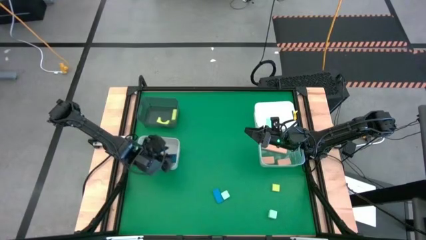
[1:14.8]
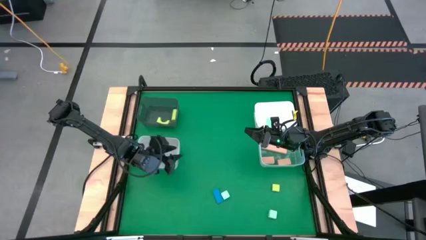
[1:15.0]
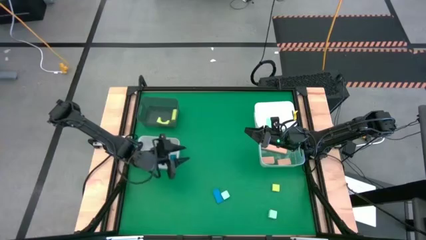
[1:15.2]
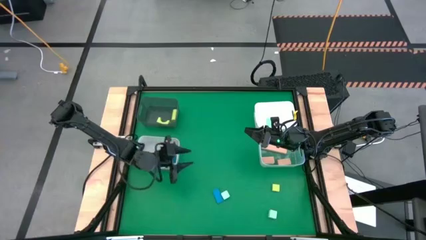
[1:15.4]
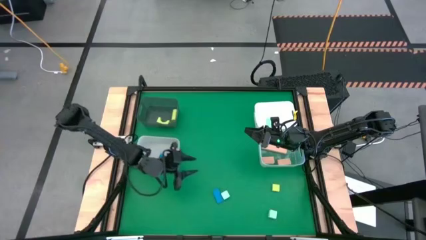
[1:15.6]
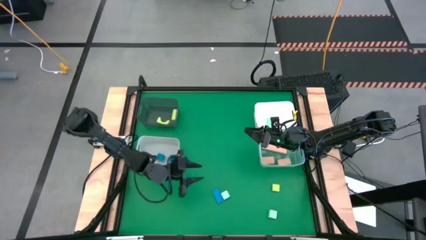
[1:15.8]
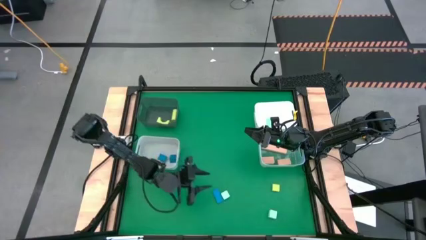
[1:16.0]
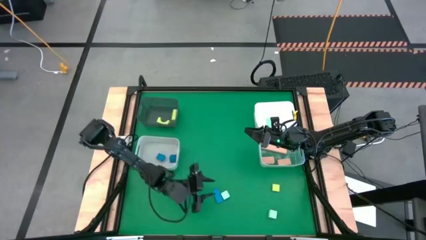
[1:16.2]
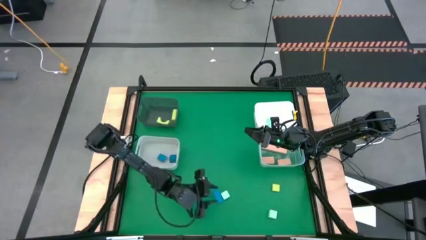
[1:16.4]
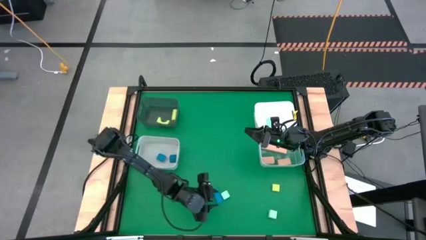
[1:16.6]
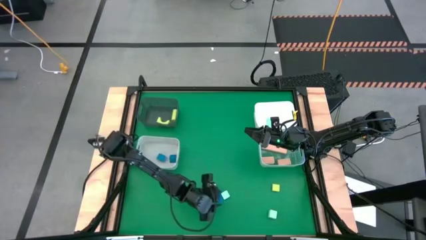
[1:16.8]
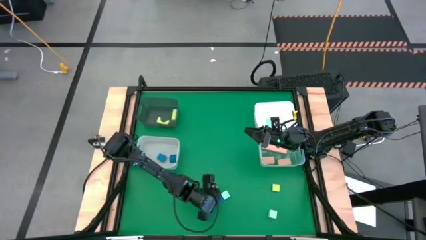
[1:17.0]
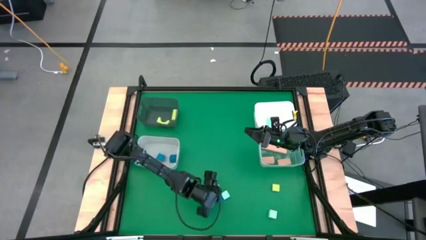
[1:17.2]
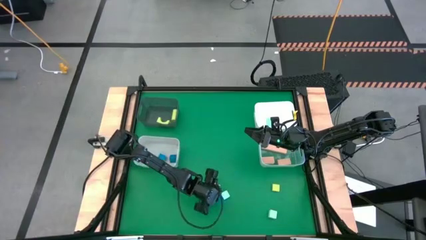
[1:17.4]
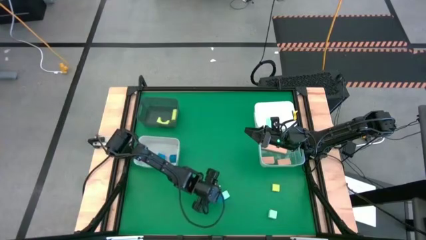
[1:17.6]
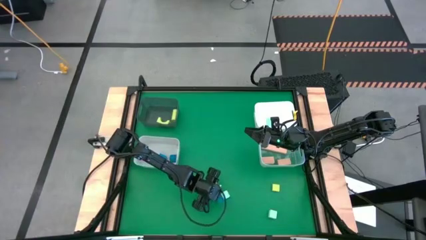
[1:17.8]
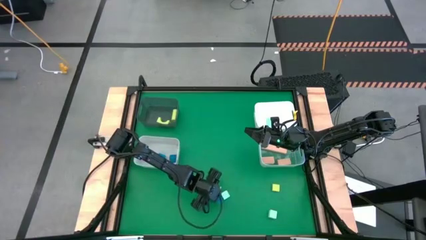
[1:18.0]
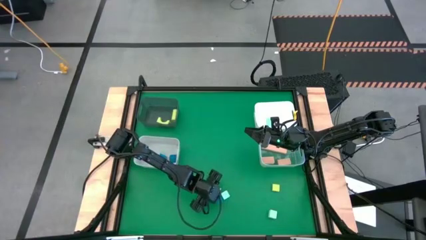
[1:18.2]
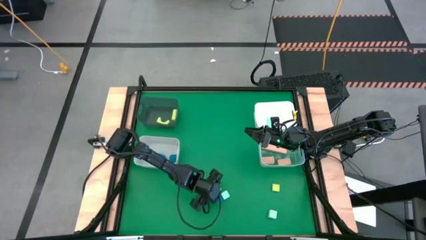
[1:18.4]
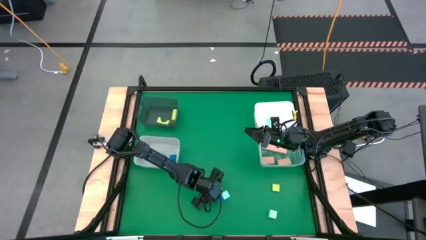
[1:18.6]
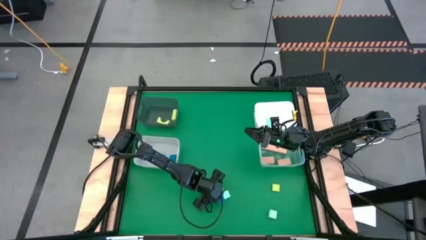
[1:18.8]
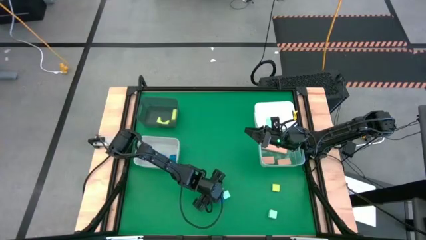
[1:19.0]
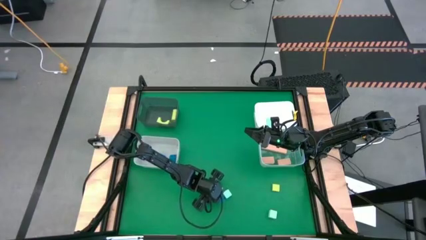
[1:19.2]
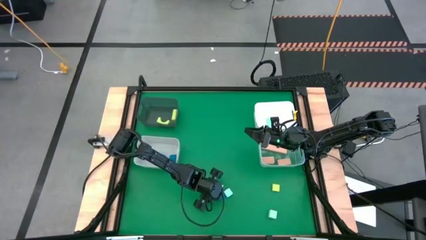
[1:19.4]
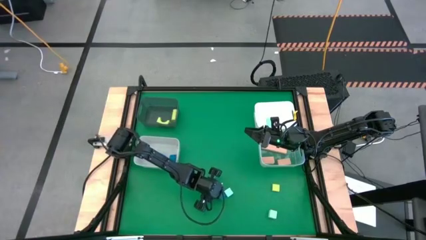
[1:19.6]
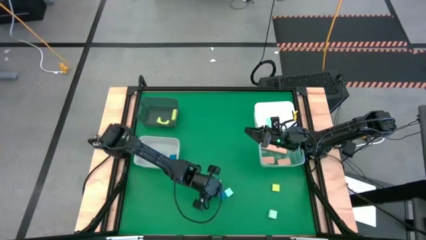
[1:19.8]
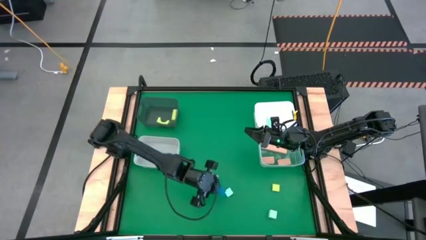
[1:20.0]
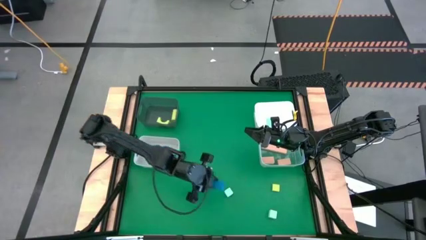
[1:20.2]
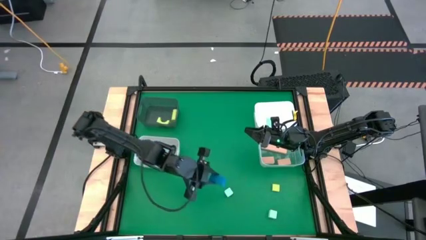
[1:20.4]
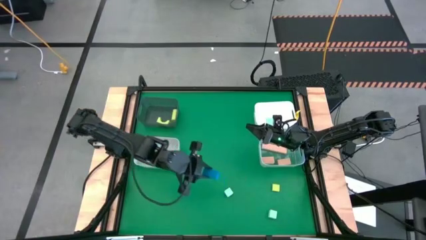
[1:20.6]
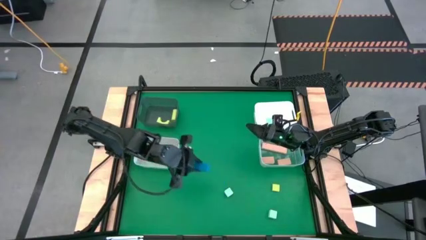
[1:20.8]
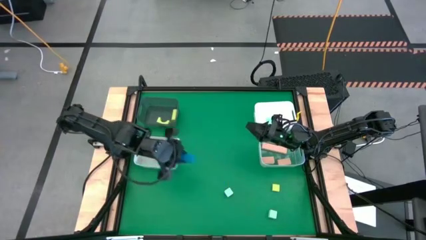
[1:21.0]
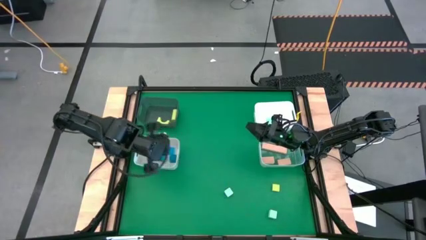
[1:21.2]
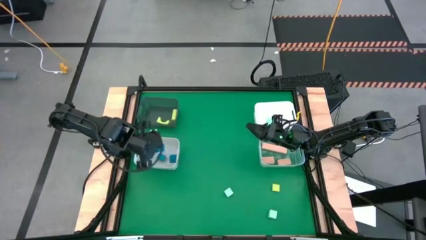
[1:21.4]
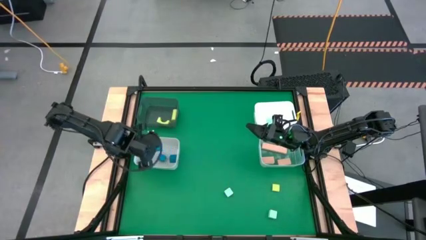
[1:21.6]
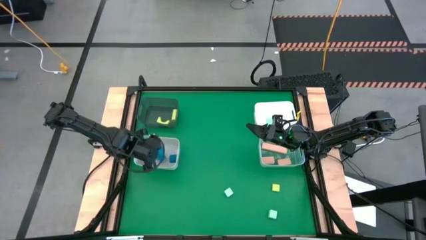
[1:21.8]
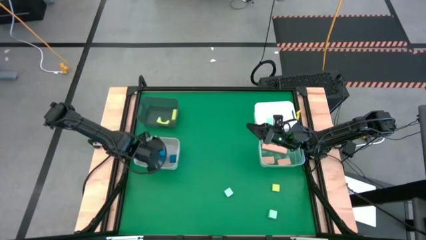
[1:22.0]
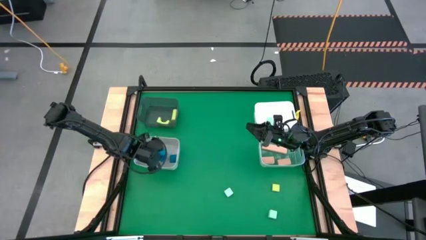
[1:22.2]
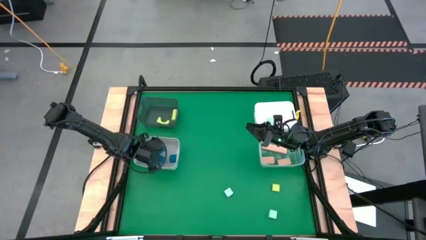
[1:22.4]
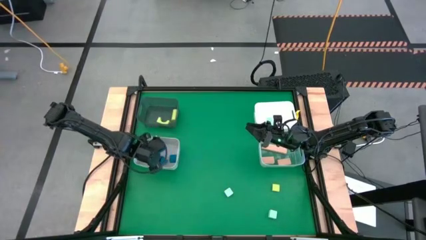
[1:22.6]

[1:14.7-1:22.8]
Task: Sort & place blocks by color
Put the small blue rectangular block into the gray bin

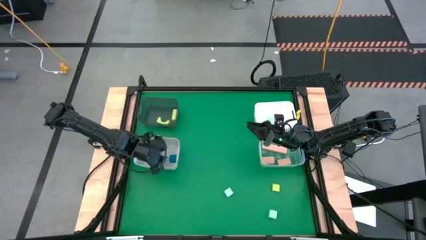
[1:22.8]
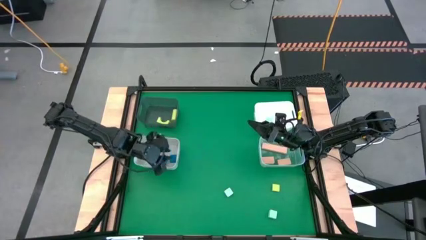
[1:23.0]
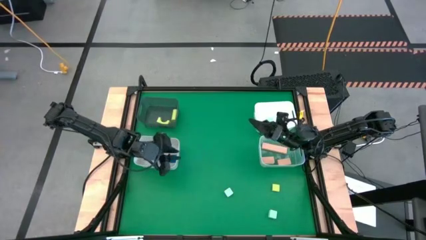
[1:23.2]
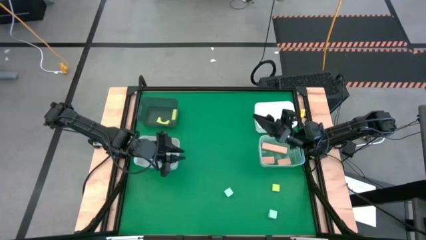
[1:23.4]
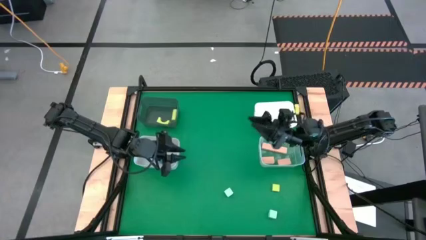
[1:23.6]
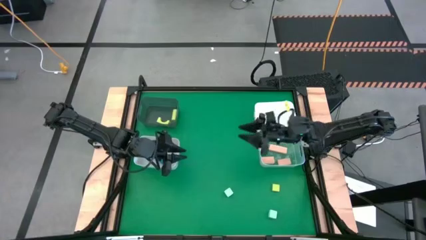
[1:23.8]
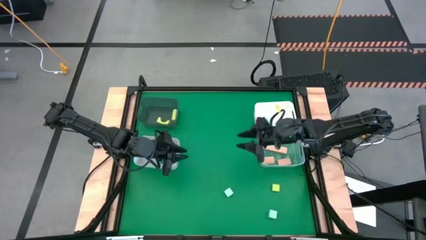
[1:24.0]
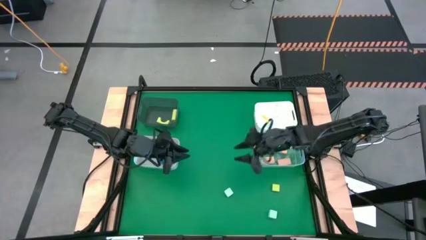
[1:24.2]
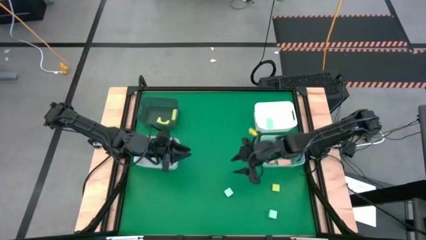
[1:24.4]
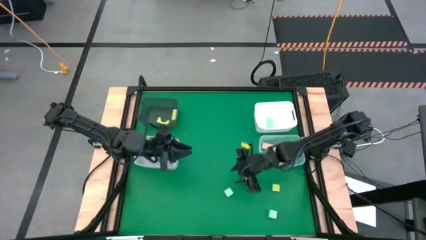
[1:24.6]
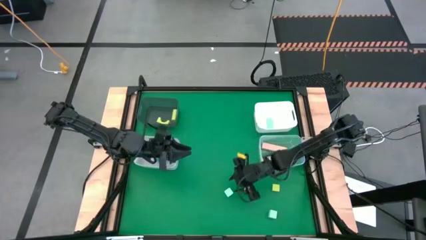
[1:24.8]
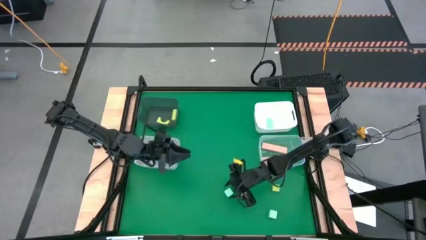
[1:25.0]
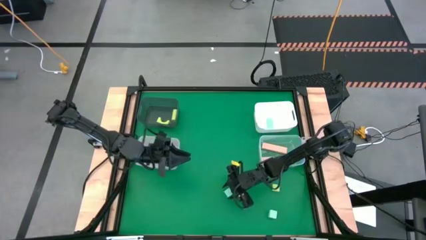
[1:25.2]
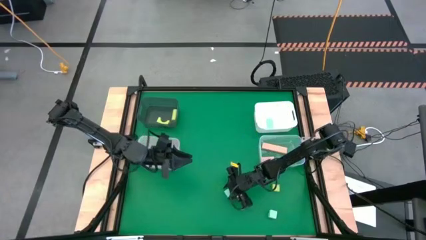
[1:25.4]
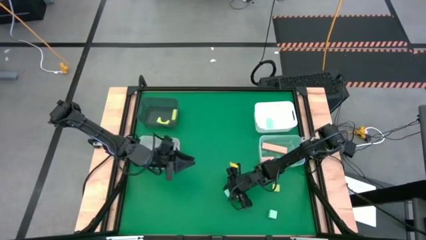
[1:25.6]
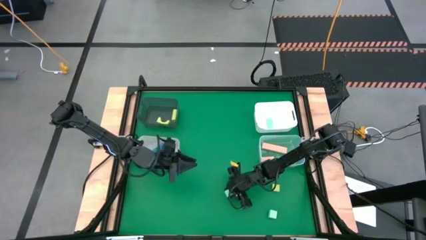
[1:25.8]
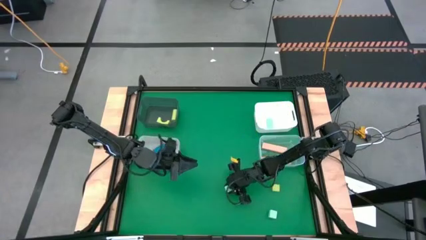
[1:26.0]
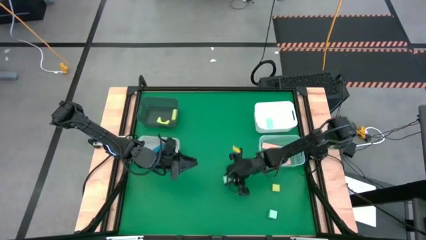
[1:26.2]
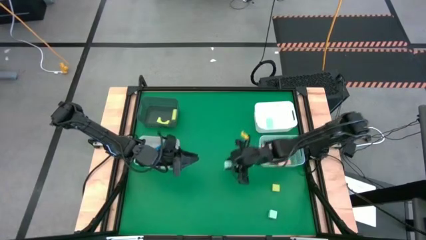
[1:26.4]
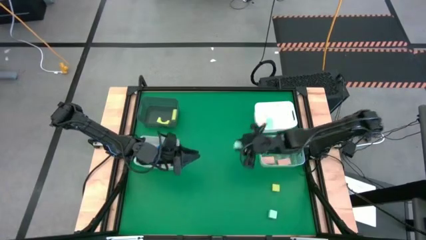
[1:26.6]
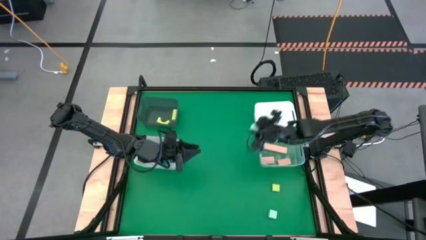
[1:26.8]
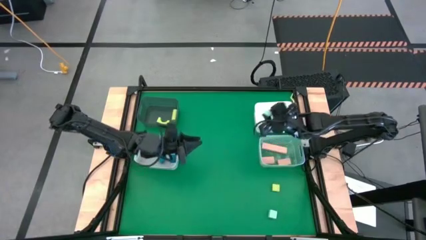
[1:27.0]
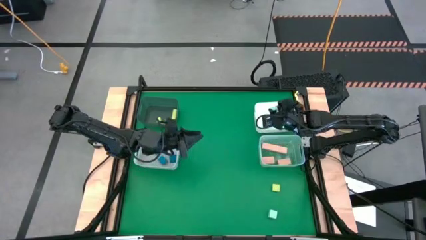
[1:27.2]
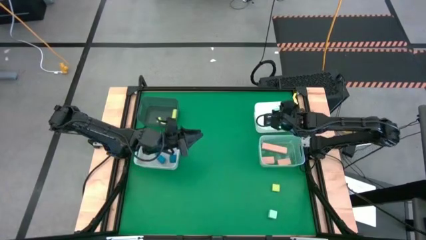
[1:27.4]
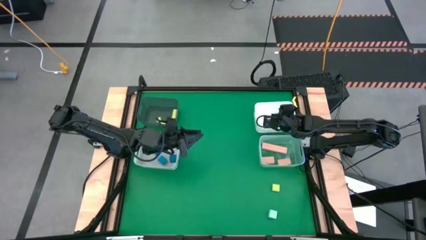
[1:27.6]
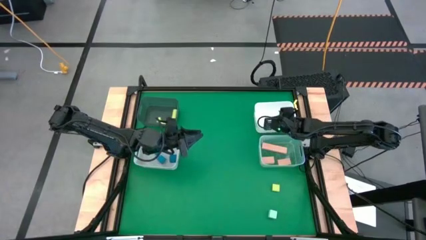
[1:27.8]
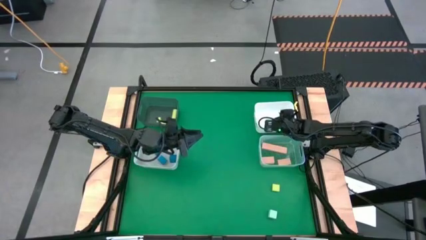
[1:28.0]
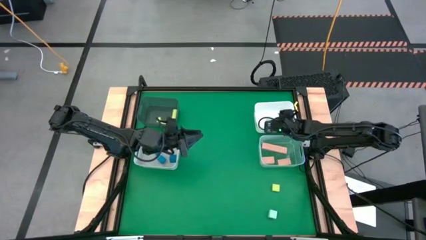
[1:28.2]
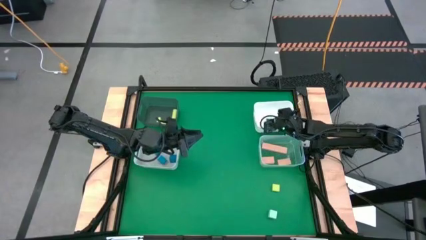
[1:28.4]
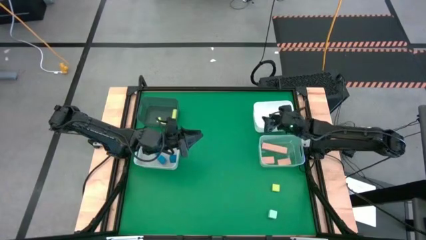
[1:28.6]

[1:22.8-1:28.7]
Put the left white square block into the white bin
